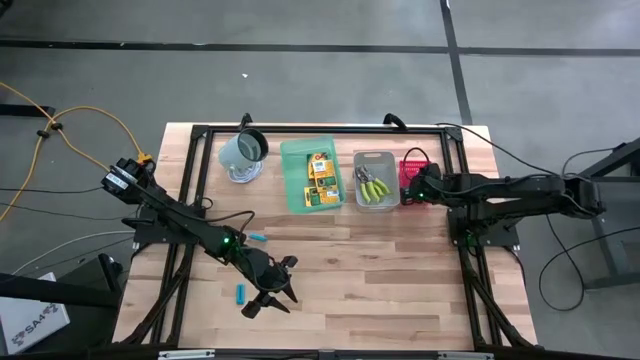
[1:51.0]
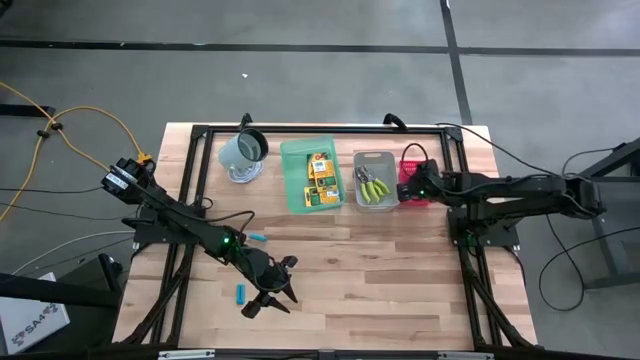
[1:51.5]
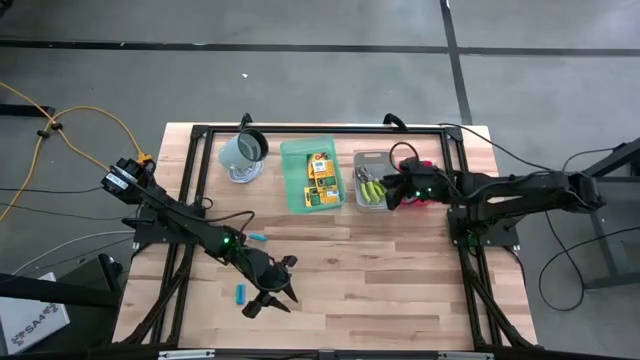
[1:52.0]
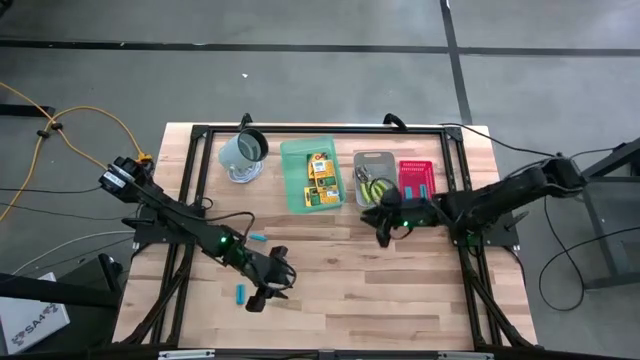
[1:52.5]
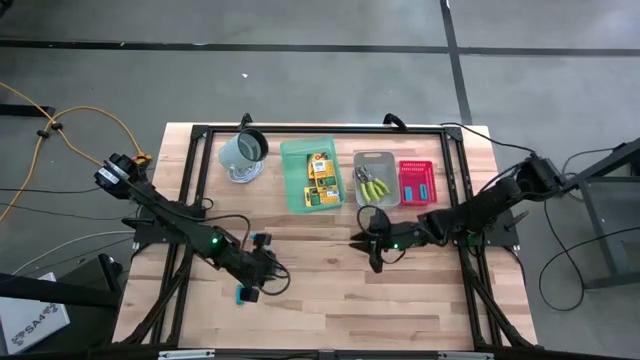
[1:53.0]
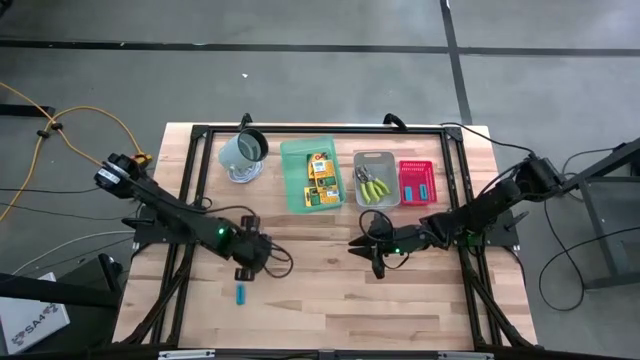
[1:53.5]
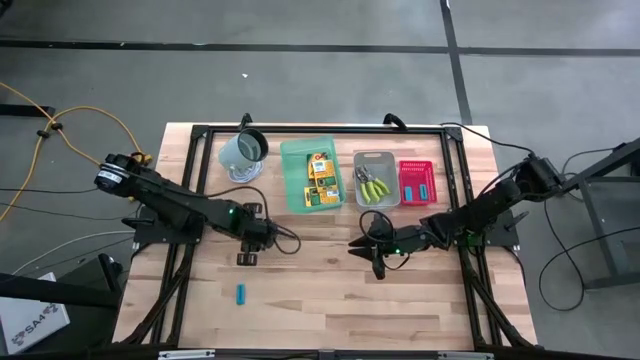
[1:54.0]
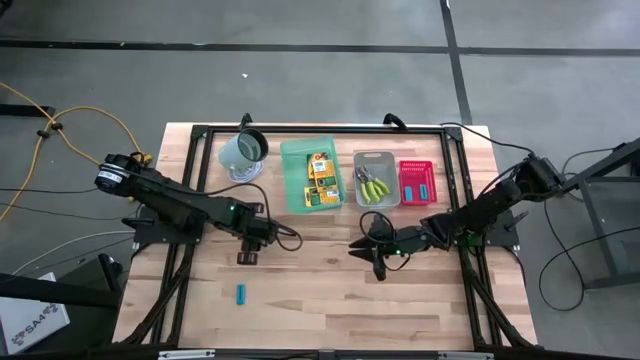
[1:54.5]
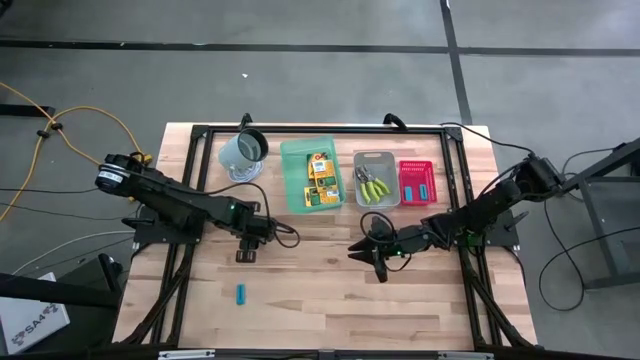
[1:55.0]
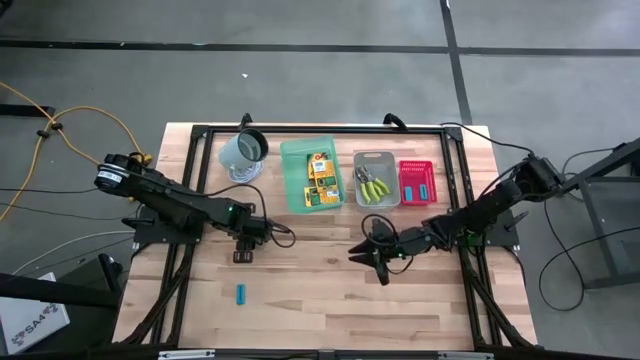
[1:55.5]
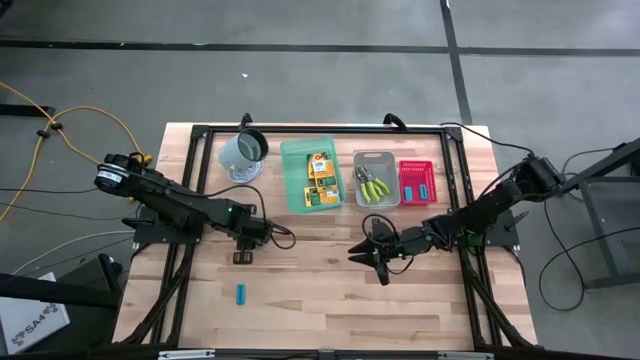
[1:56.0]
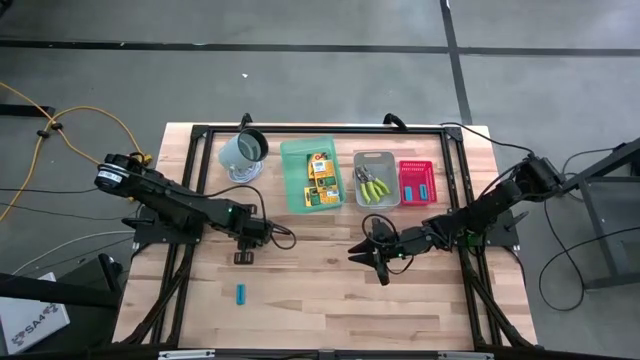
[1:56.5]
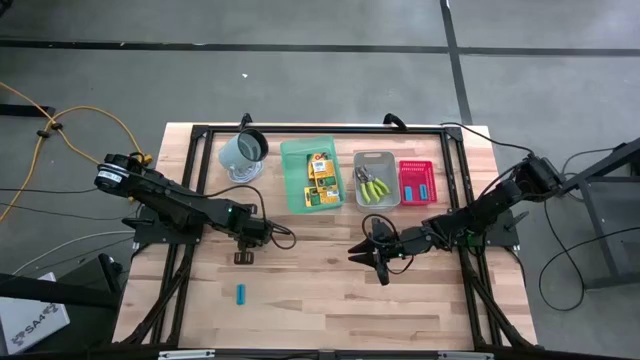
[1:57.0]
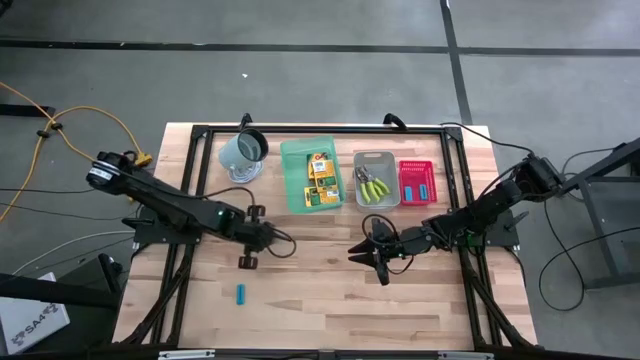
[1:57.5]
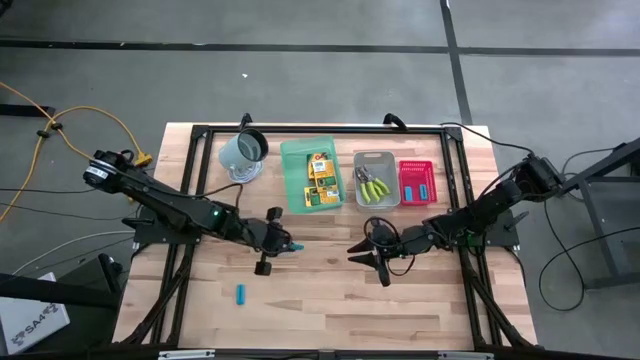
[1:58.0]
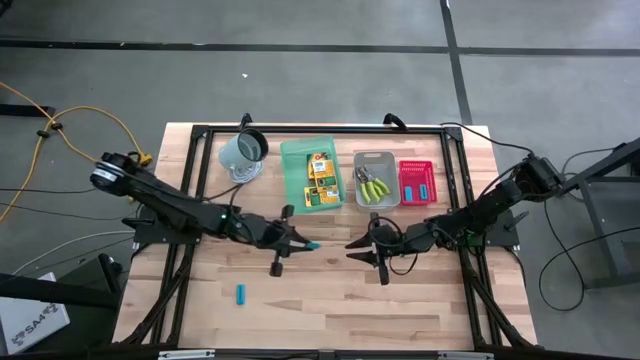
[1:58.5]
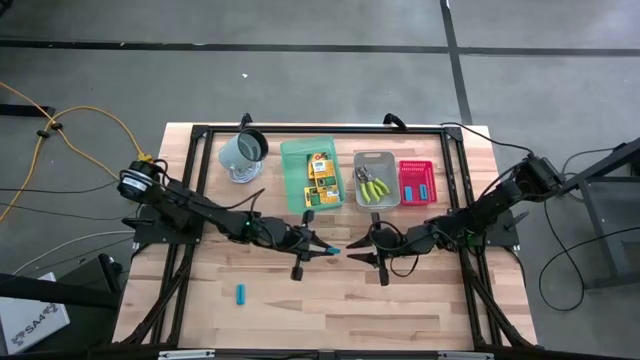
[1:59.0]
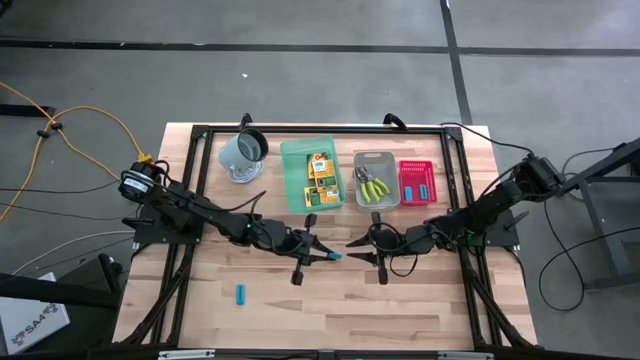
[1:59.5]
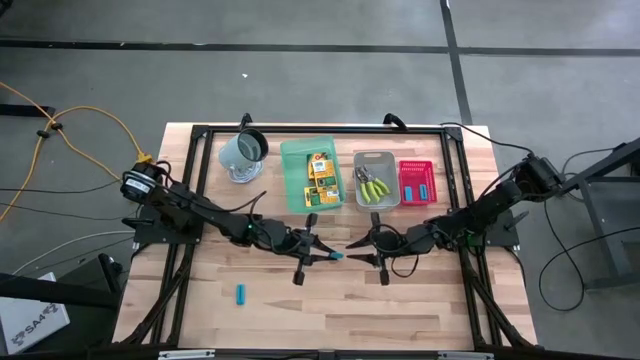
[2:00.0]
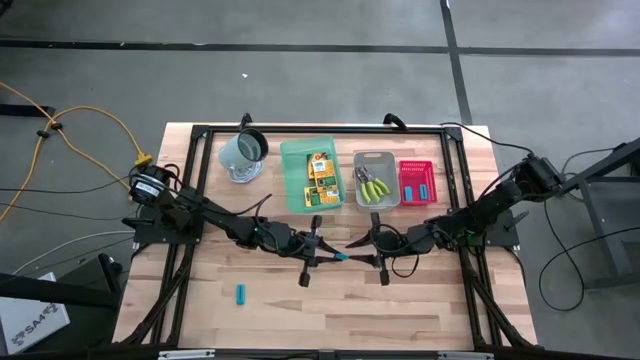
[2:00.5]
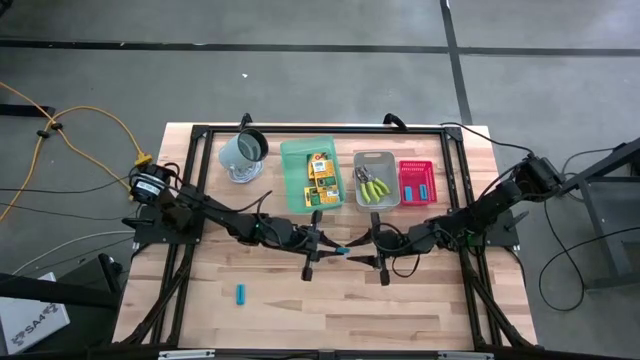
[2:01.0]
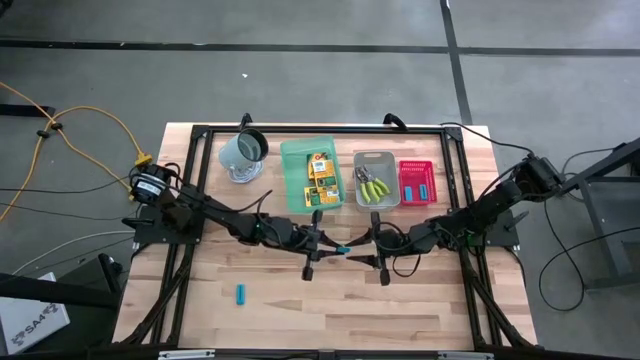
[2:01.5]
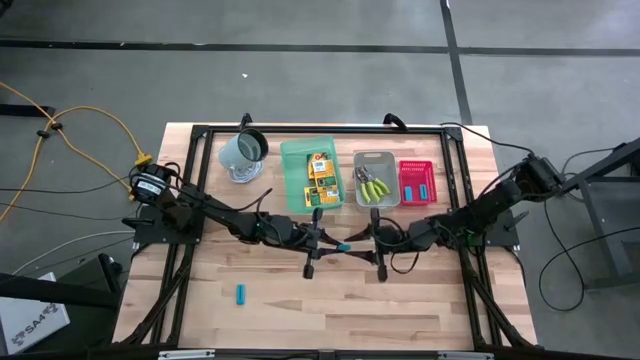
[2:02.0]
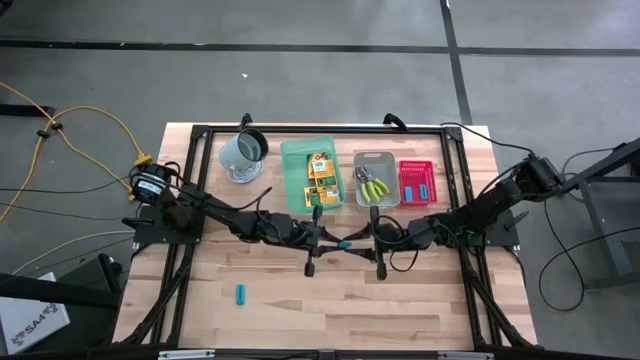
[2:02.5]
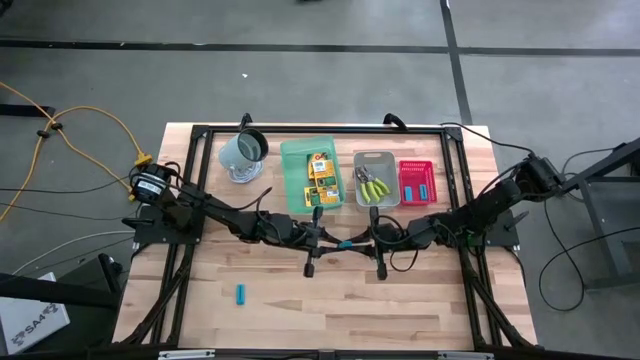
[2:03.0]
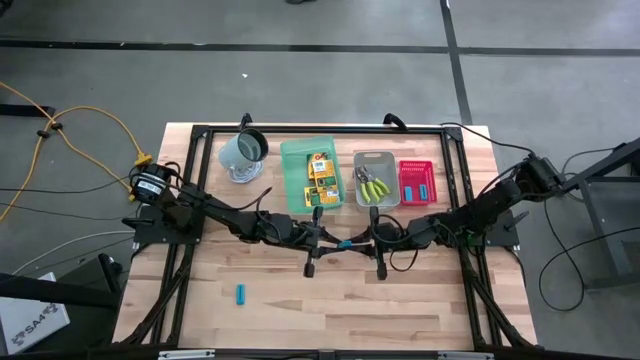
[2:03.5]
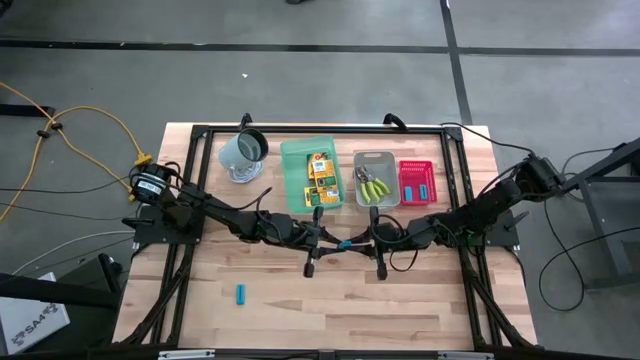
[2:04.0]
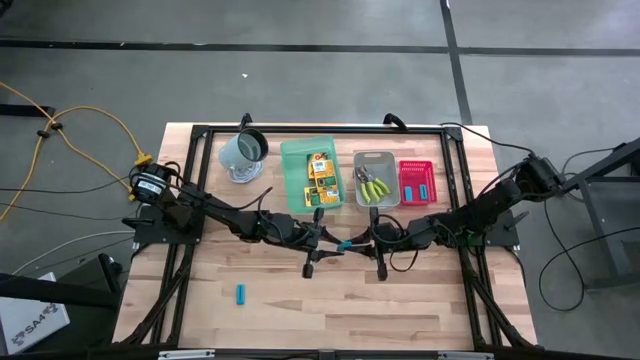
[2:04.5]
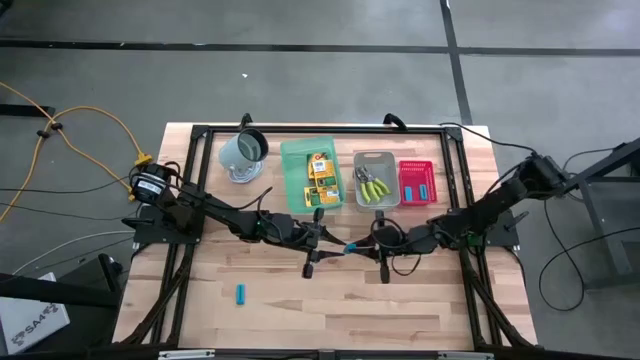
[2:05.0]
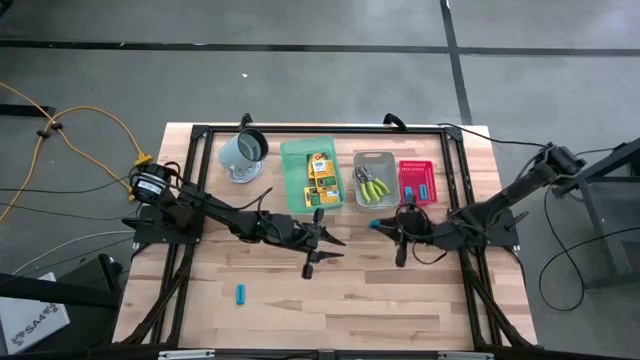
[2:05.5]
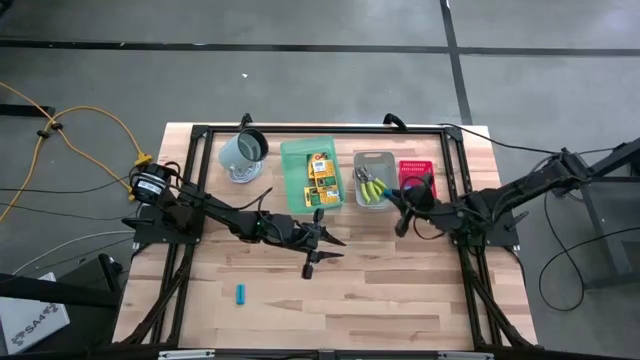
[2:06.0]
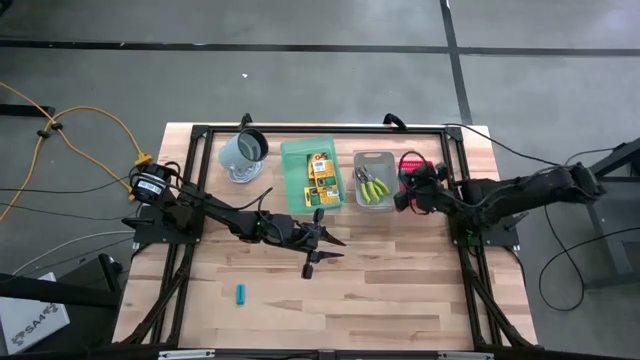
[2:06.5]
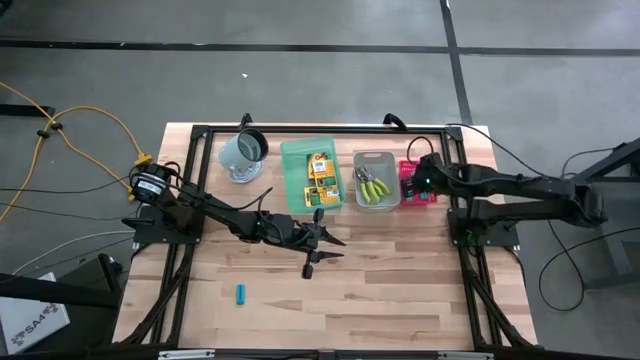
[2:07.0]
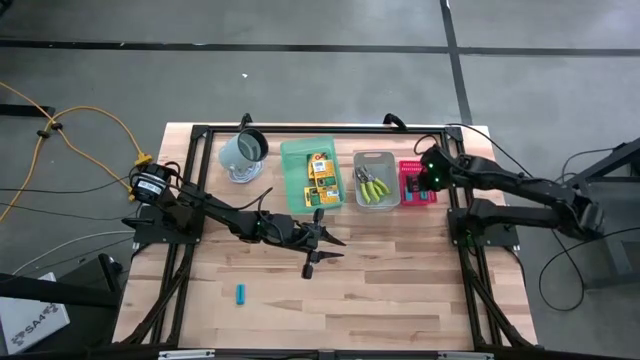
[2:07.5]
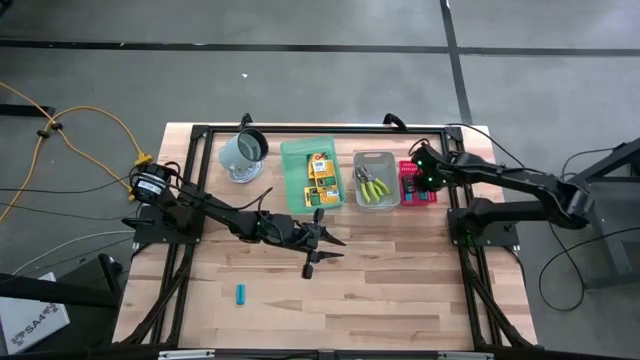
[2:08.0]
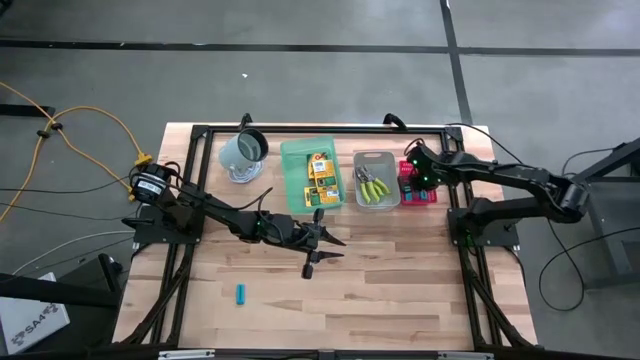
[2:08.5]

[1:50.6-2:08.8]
Task: Pick & Place School Supplies
Put the top blue eraser into the red bin

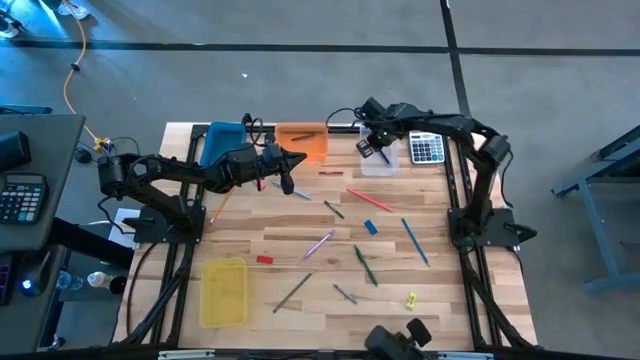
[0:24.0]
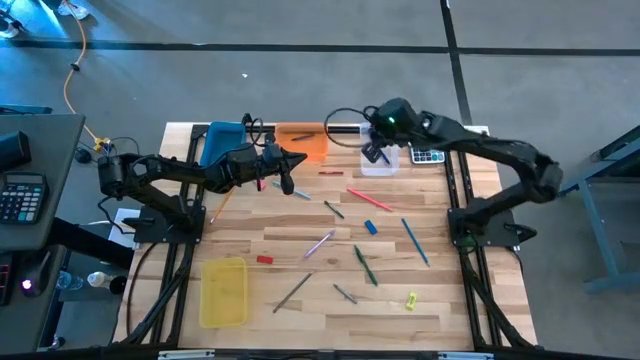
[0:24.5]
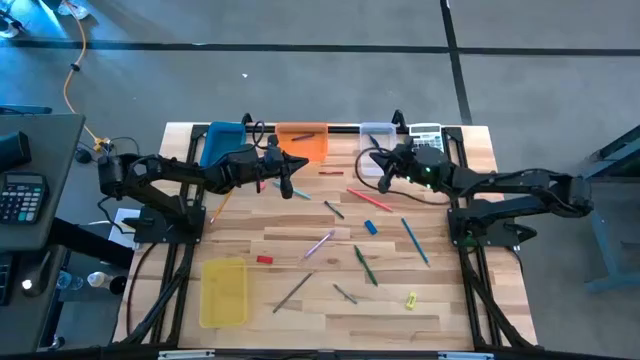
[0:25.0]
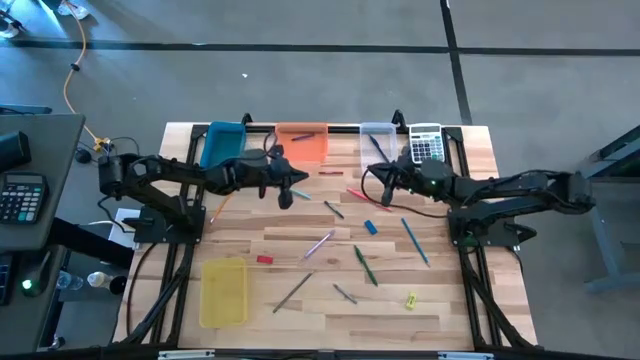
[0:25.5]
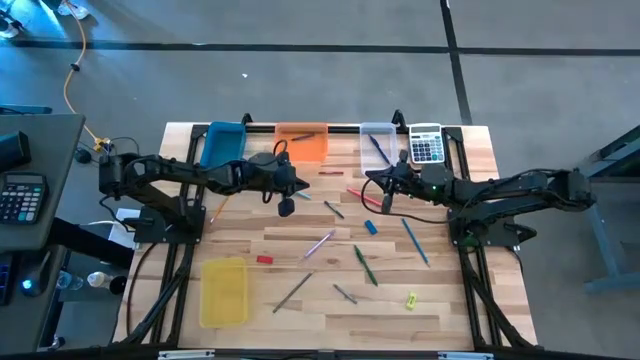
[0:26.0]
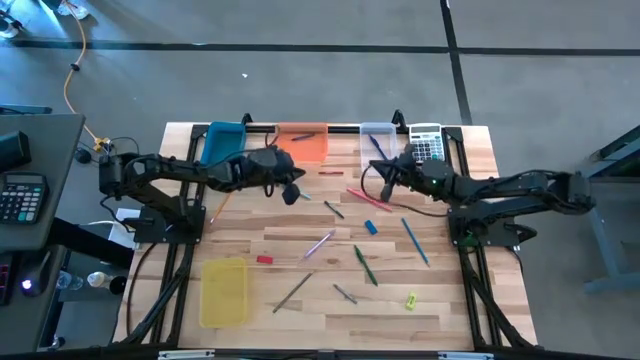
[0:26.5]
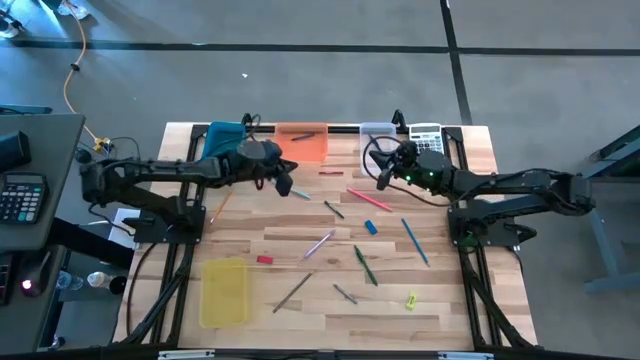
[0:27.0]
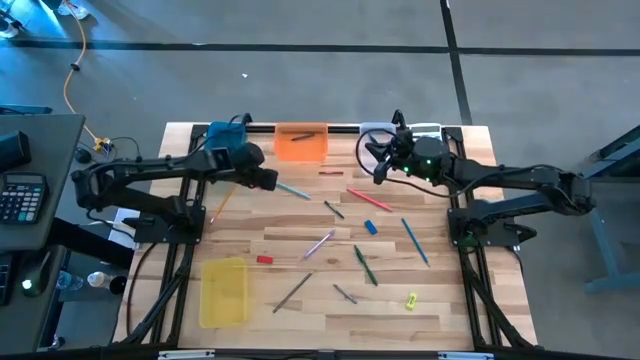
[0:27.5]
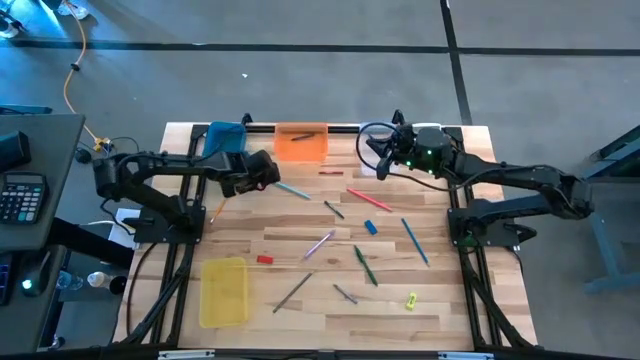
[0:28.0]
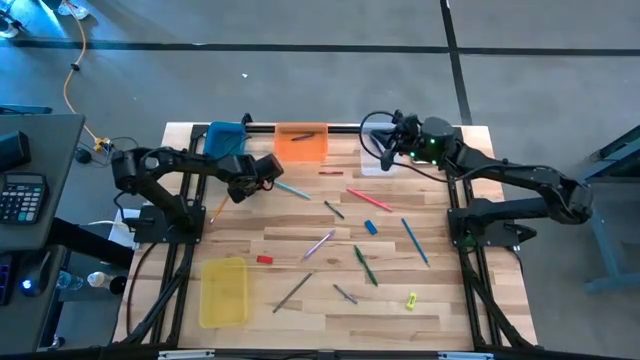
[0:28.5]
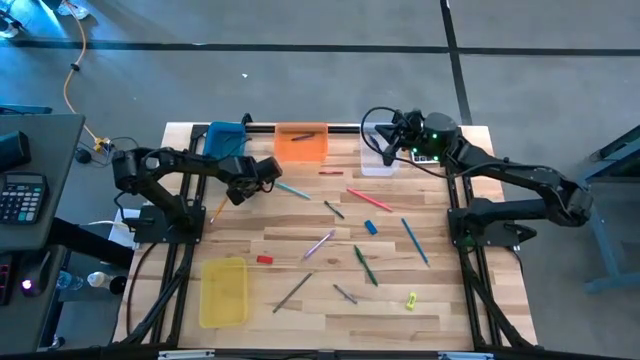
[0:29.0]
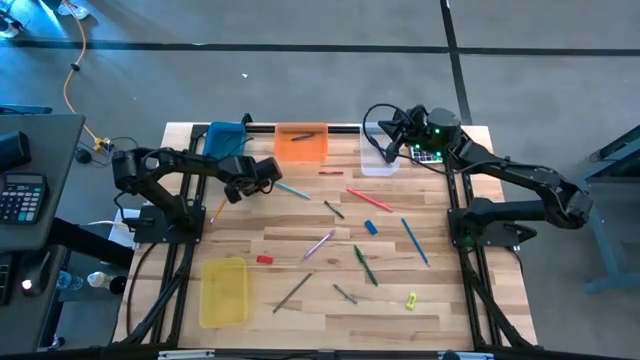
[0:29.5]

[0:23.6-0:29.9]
Task: Sort crayons/erasers/pens/pencils in bins
Put the pink eraser into the blue bin
